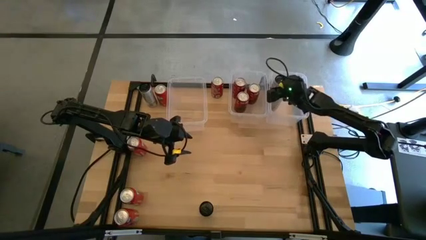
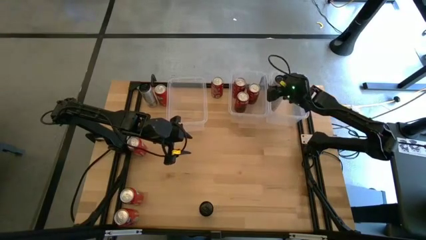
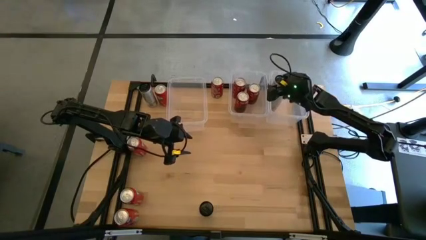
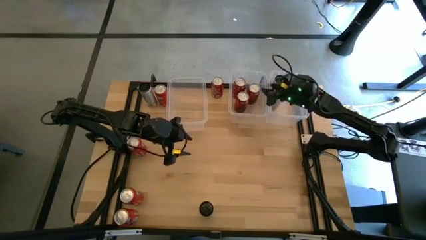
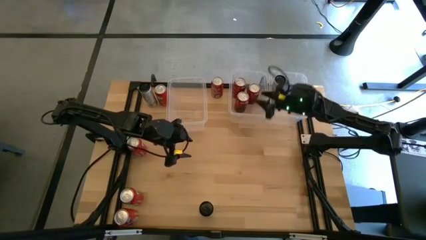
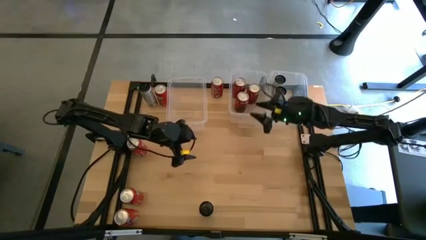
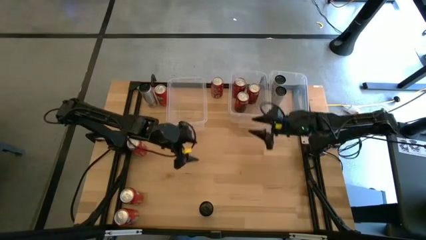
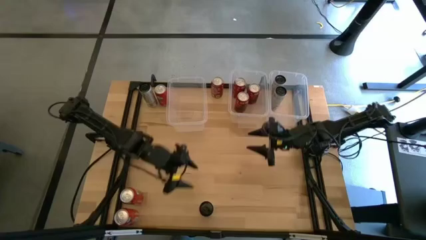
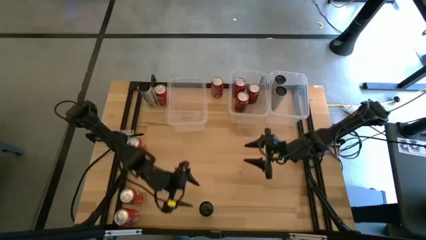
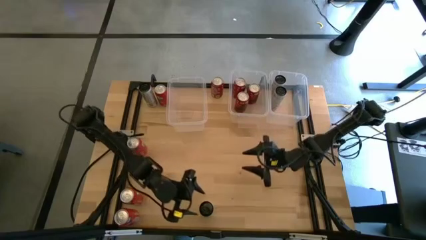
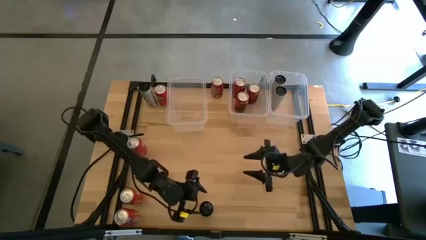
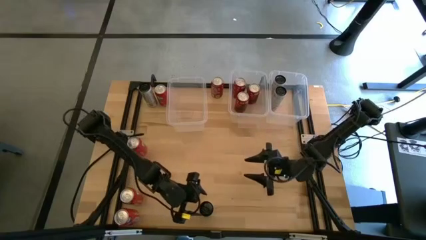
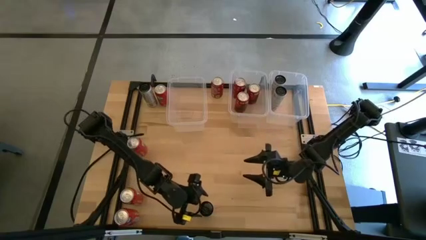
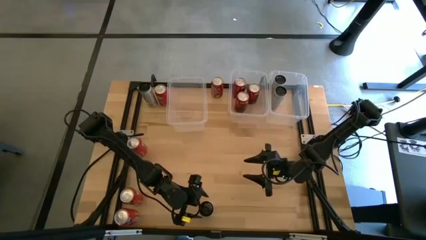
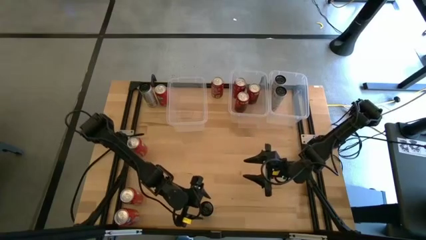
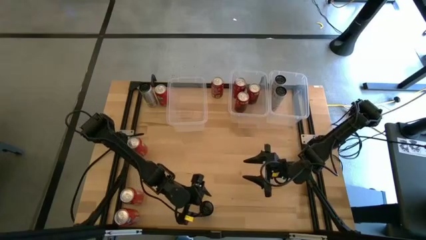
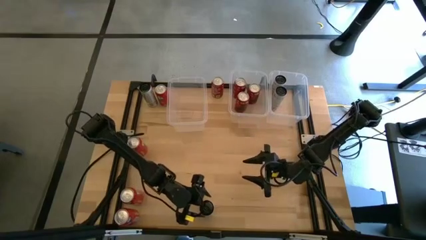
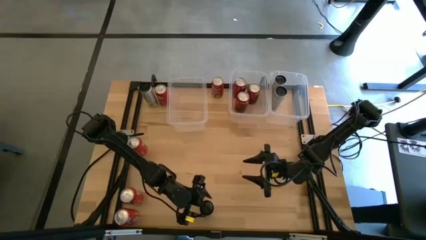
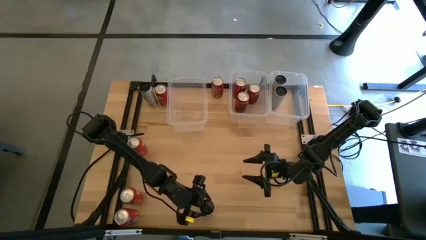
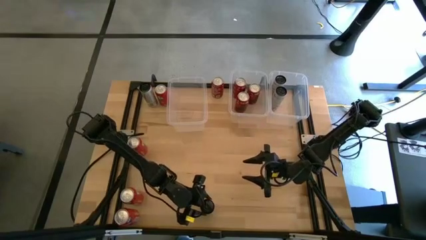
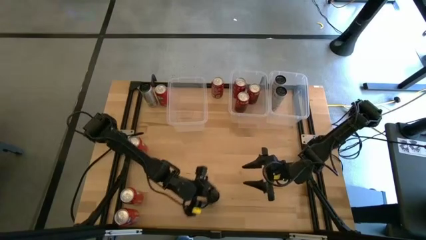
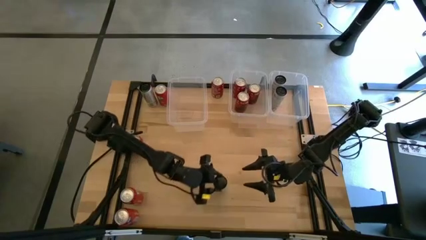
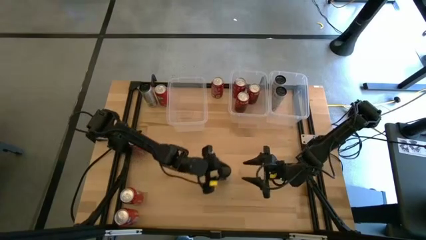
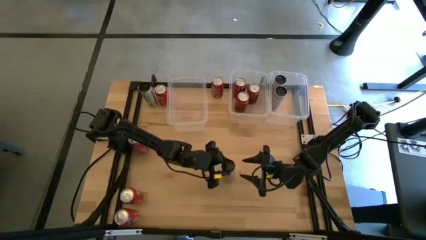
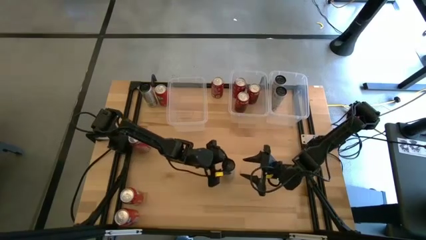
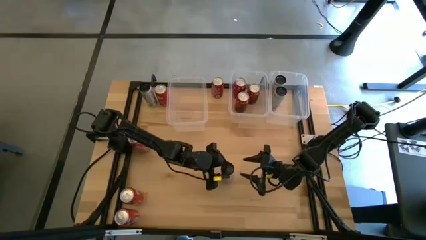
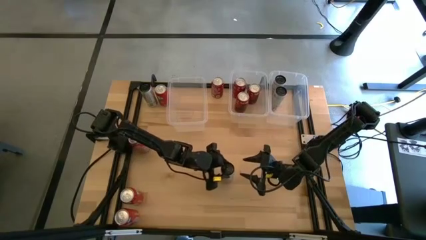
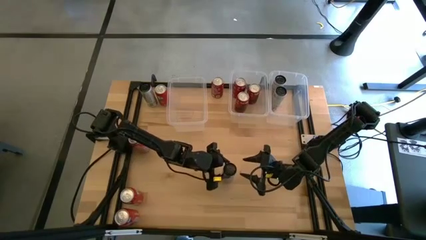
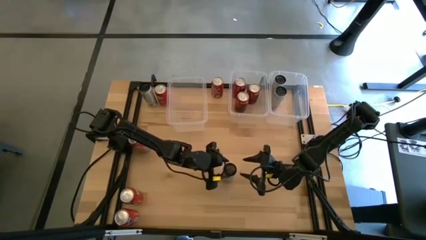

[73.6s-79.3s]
Task: Sort soda cans
Move the bottom white and yellow soda can to the center of the table

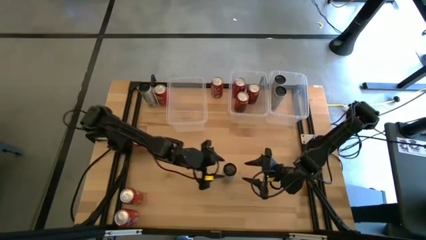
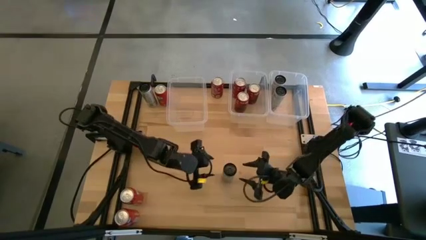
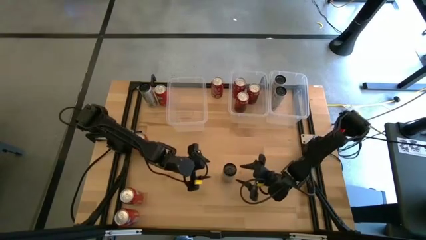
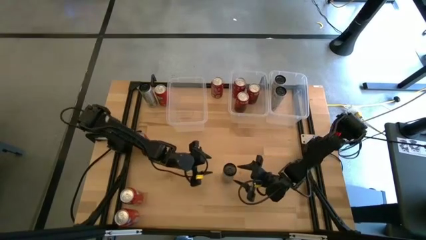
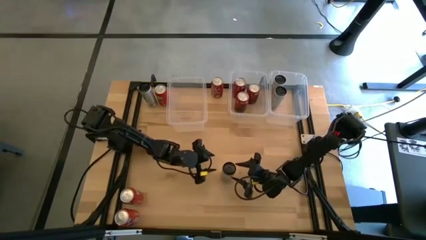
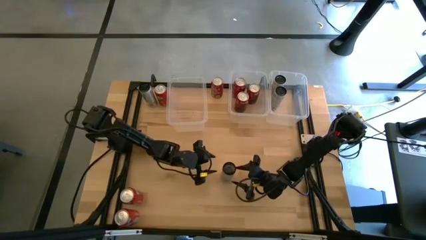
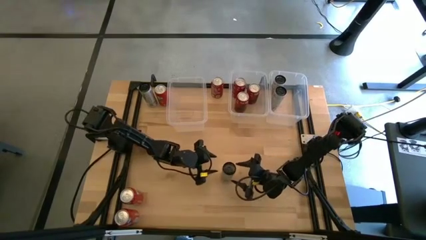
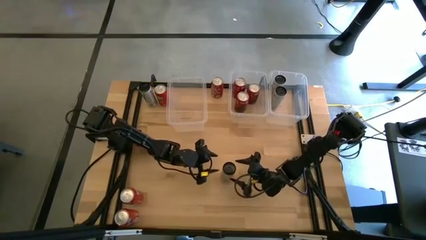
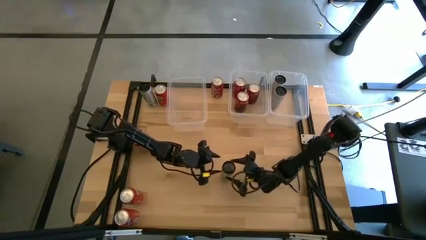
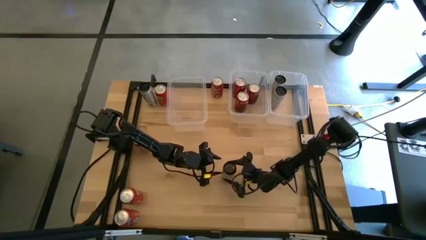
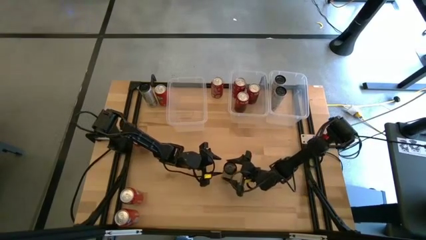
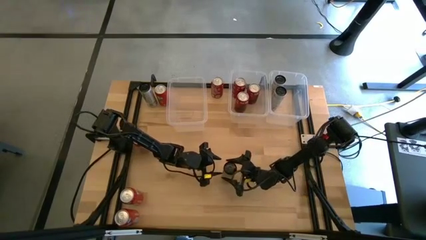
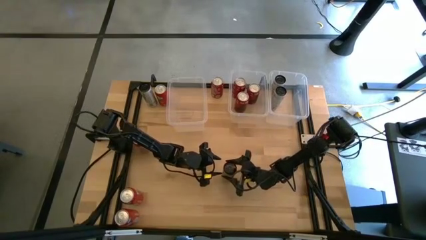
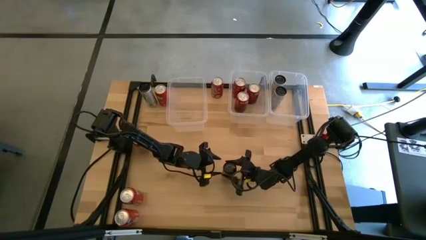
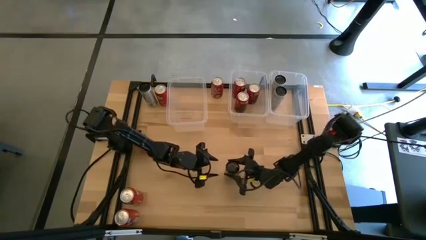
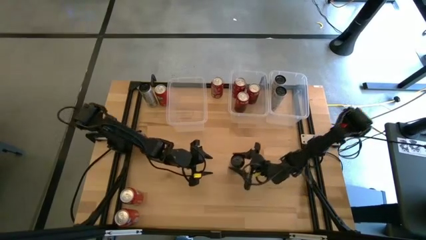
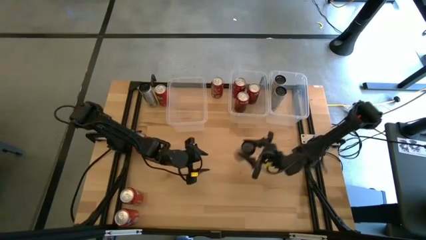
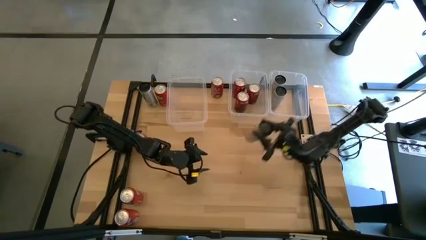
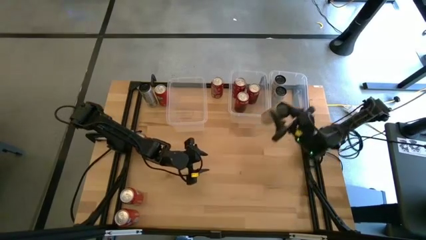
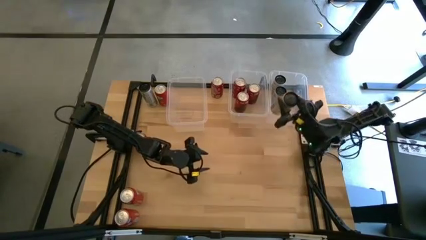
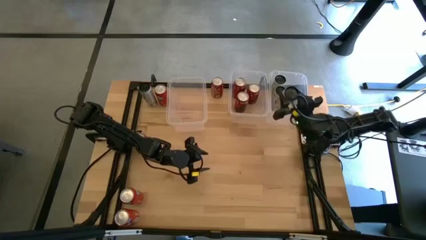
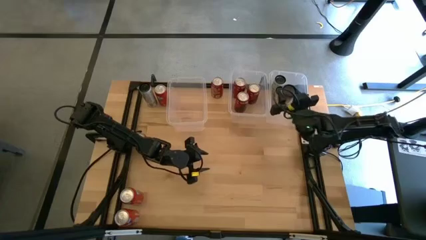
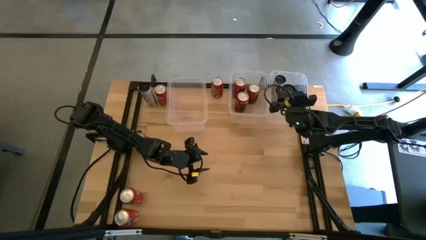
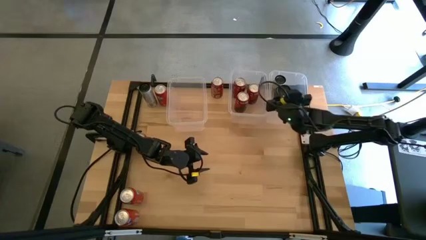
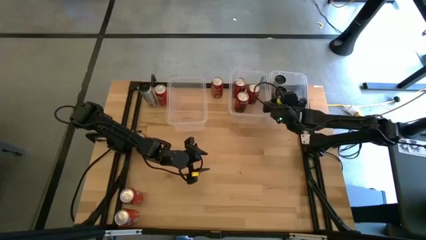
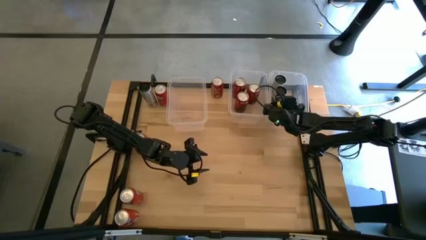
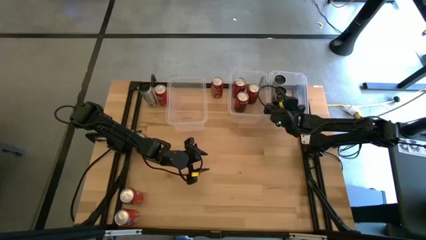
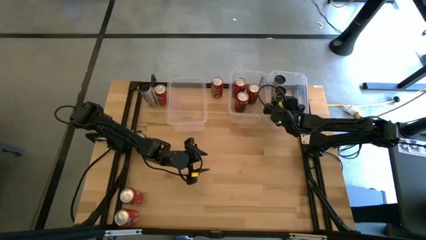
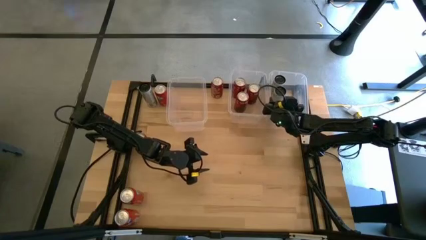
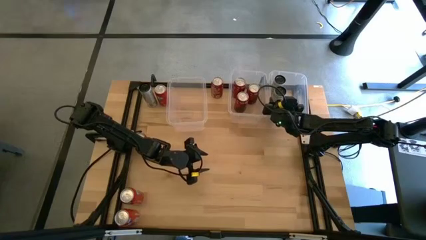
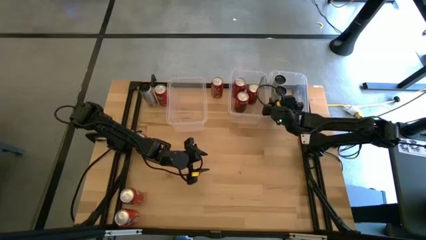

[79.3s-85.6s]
Put the bottom white and yellow soda can into the right transparent bin

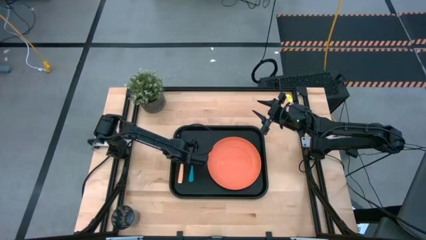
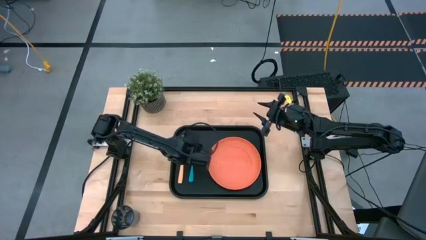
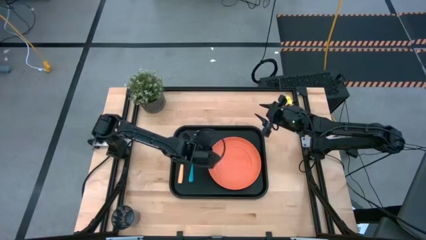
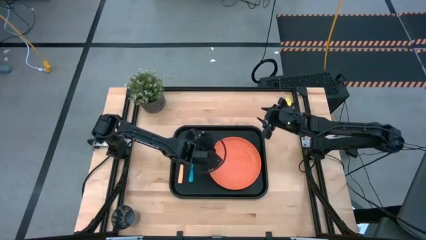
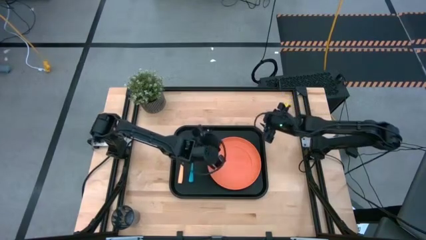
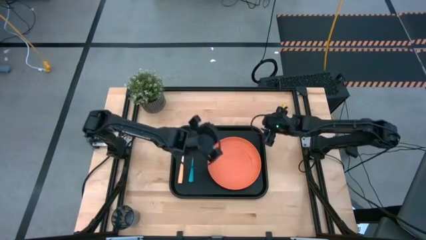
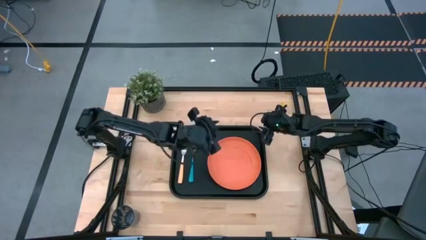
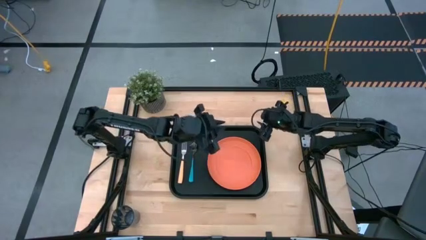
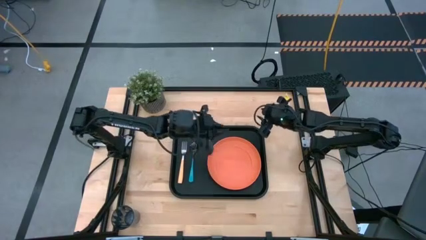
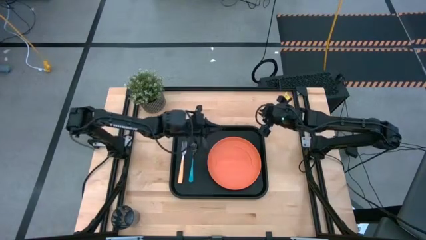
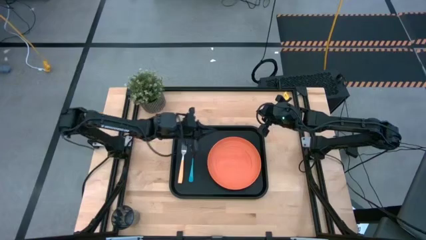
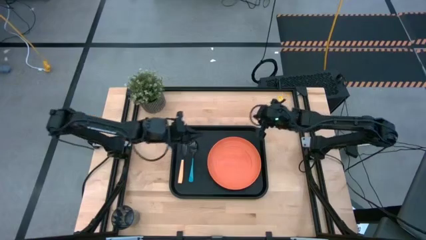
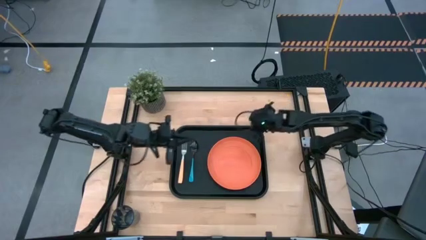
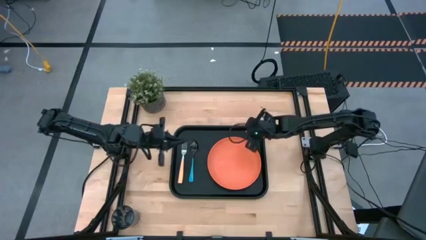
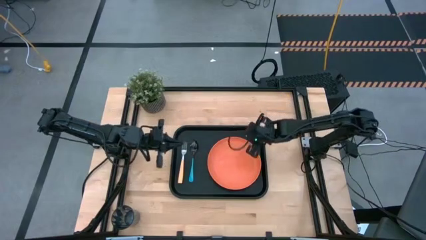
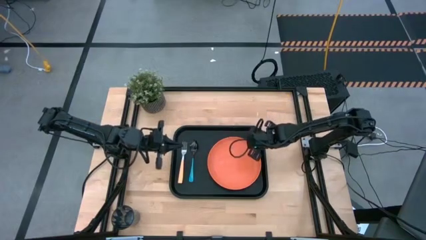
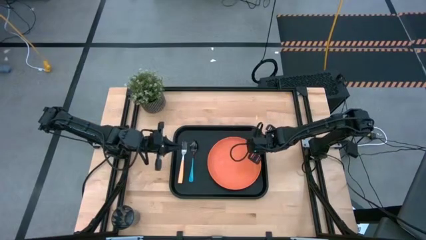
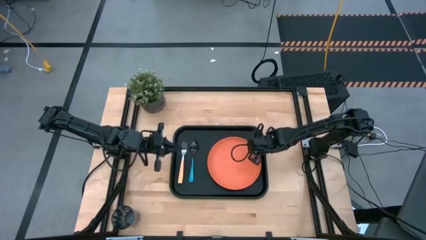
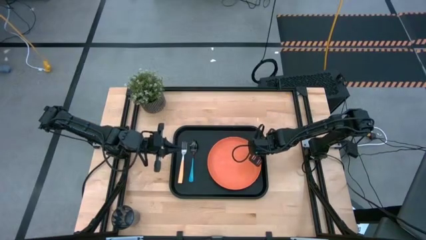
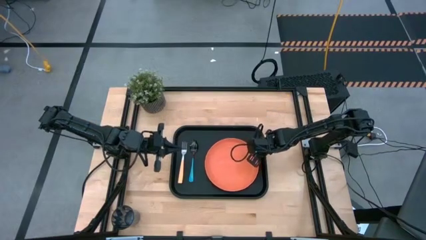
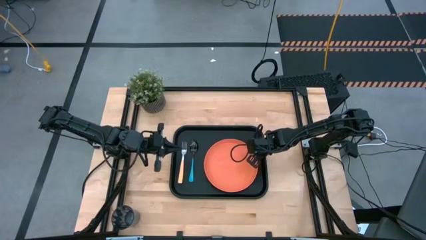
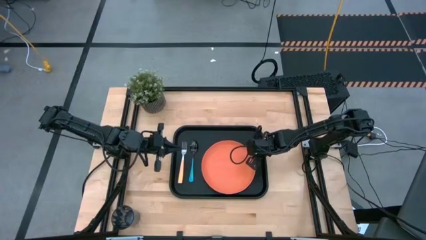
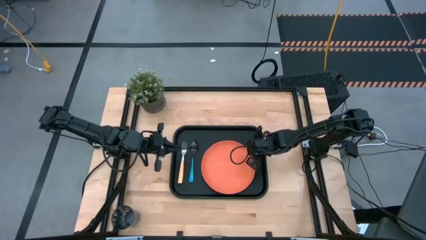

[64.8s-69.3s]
Task: Pick and place plate/cup/fork/spoon on tray
Adjust the orange plate
